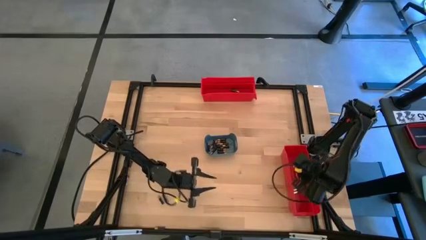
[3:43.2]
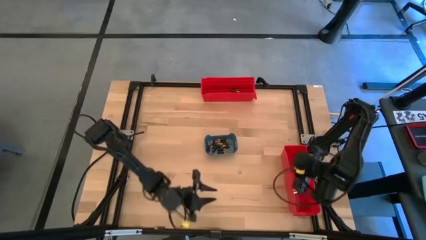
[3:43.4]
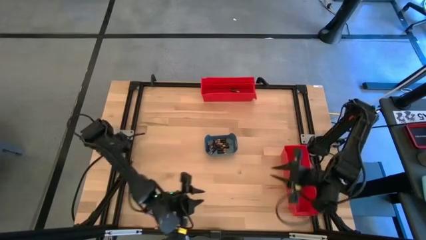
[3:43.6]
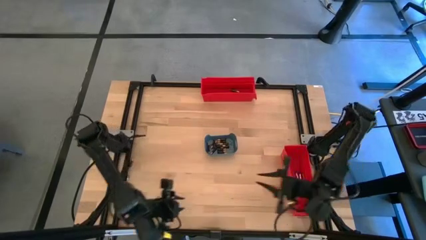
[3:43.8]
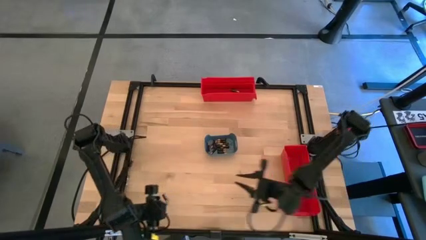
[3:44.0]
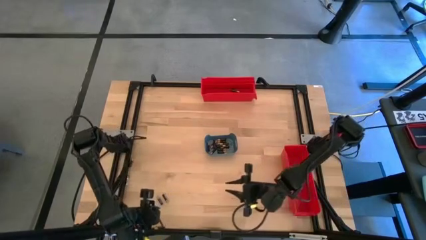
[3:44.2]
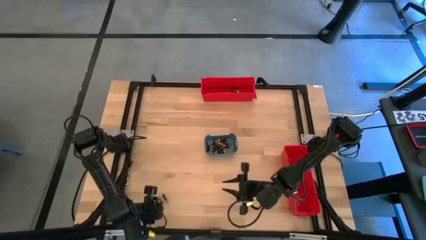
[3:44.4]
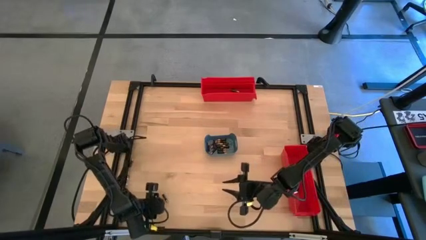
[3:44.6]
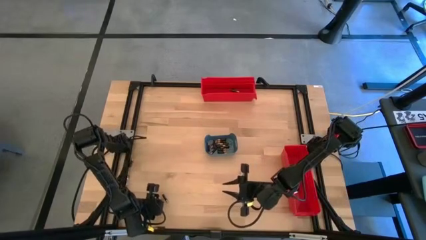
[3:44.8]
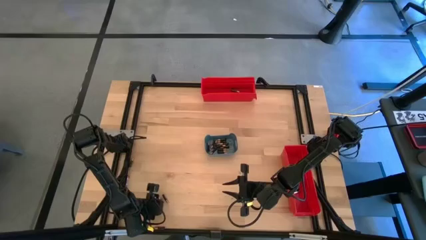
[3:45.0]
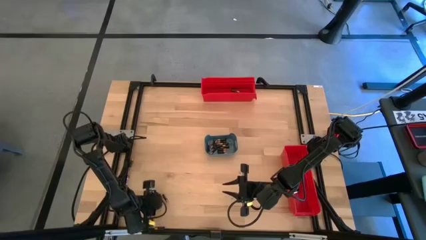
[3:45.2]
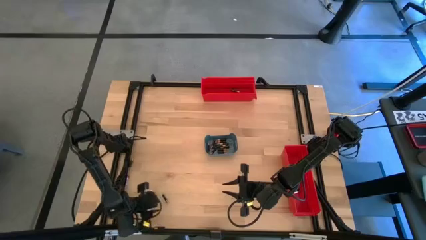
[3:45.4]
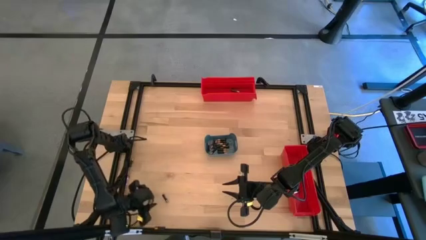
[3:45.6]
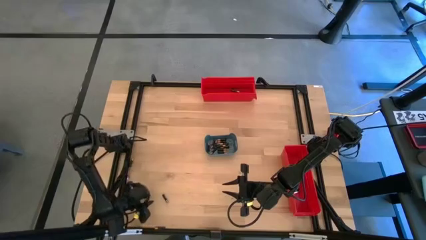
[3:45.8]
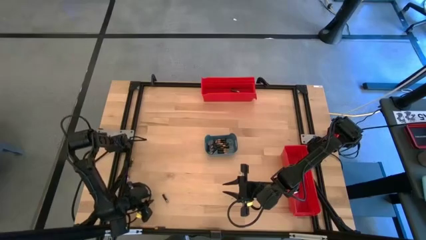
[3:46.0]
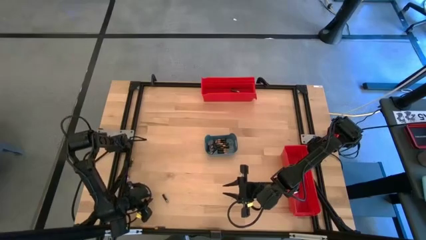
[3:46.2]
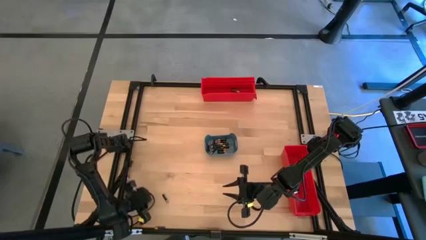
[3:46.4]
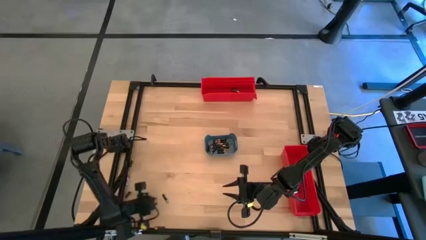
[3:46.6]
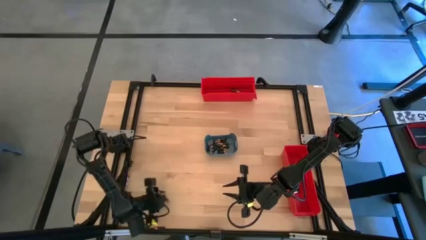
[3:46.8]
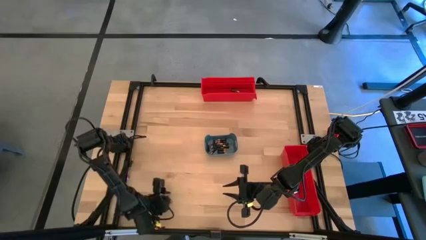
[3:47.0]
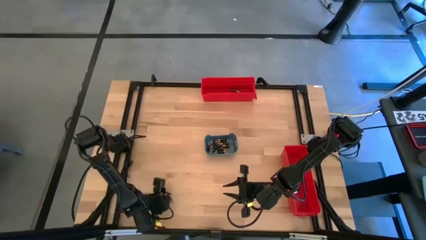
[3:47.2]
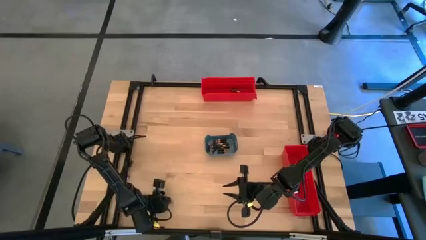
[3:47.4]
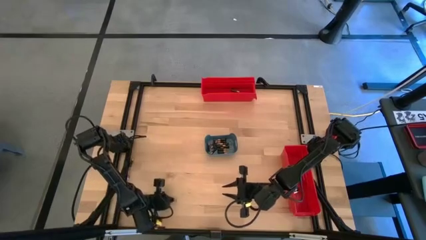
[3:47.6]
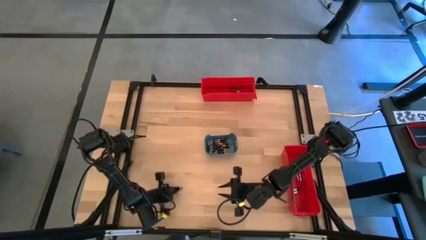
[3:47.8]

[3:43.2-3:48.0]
Task: Sort batteries
Put the black battery into the blue bin

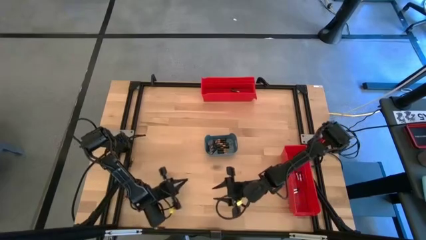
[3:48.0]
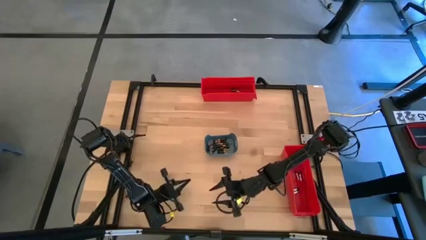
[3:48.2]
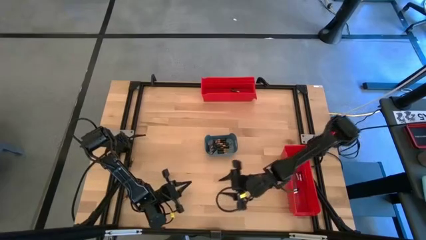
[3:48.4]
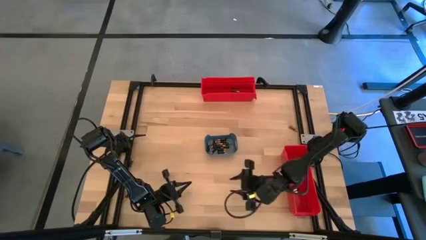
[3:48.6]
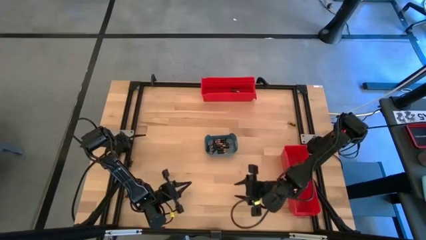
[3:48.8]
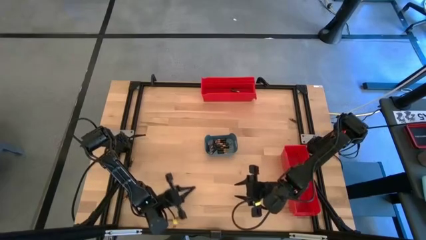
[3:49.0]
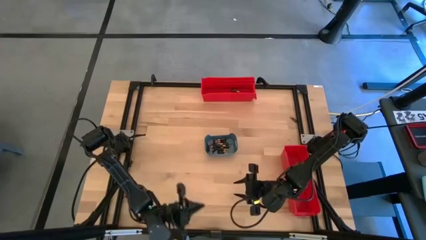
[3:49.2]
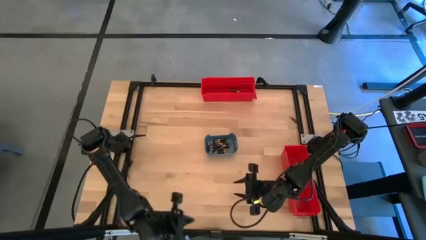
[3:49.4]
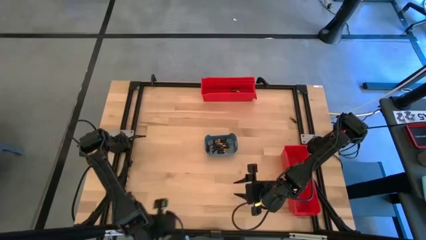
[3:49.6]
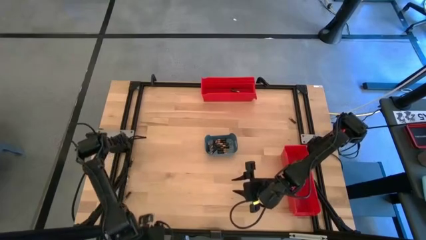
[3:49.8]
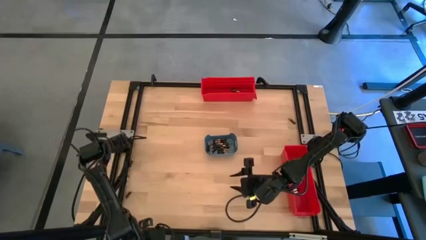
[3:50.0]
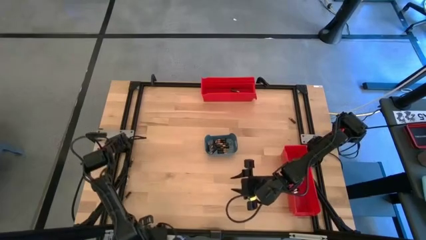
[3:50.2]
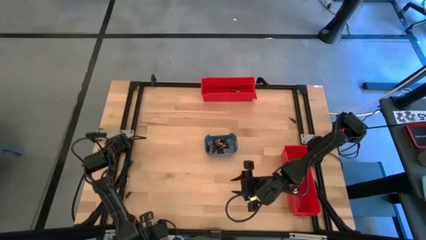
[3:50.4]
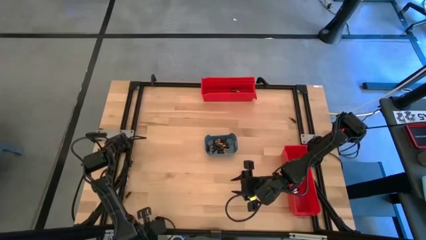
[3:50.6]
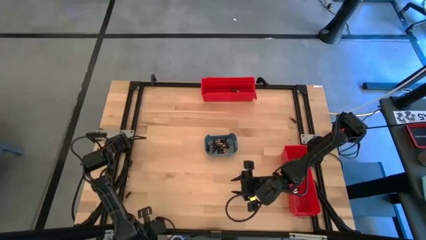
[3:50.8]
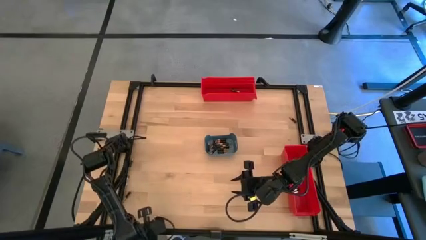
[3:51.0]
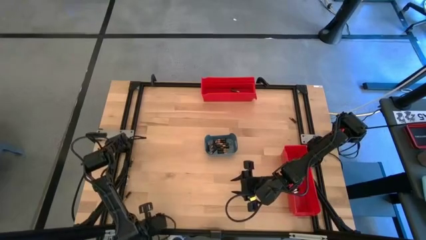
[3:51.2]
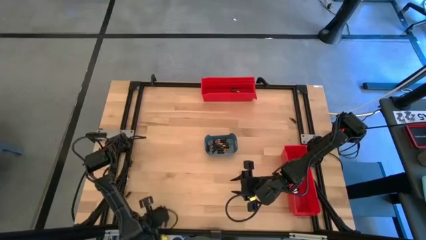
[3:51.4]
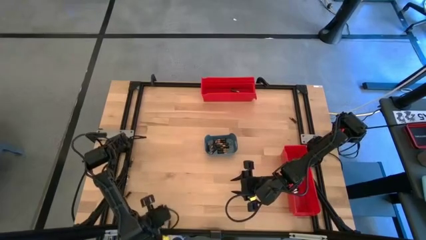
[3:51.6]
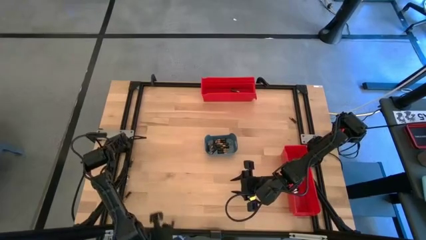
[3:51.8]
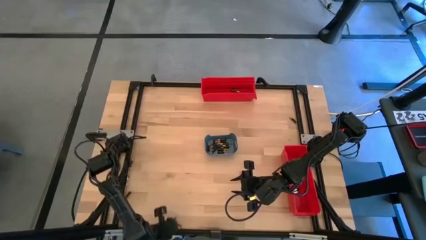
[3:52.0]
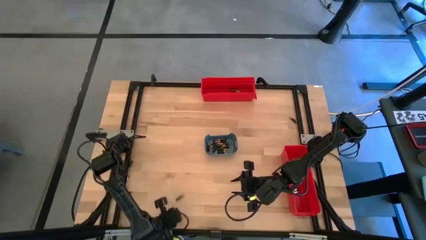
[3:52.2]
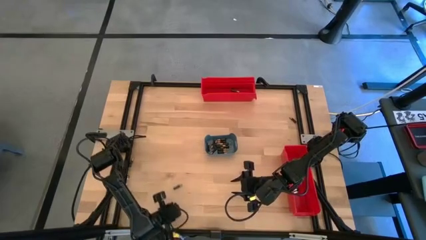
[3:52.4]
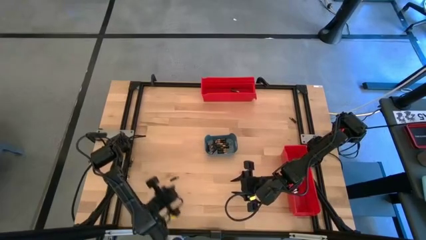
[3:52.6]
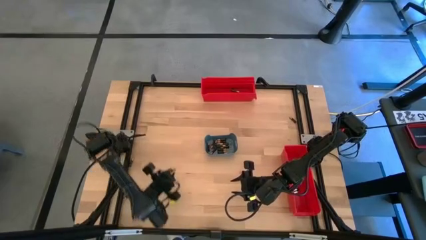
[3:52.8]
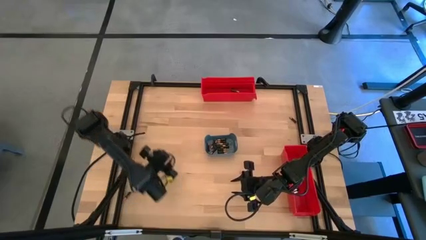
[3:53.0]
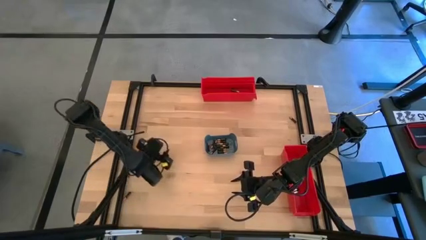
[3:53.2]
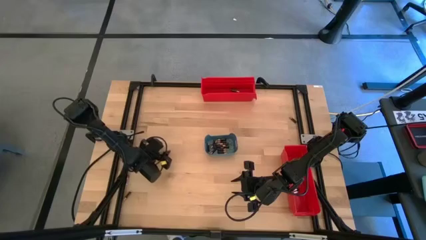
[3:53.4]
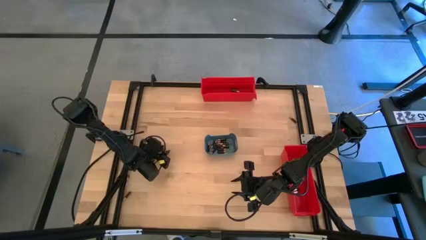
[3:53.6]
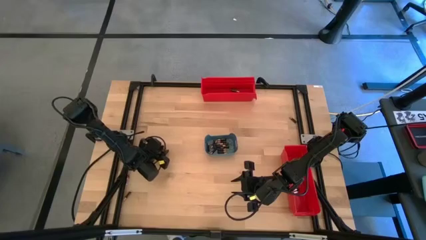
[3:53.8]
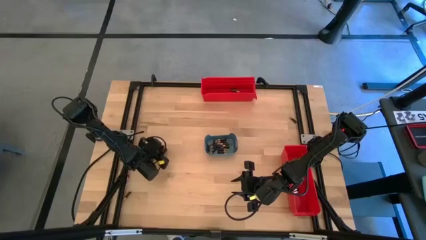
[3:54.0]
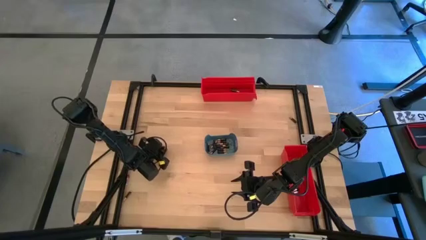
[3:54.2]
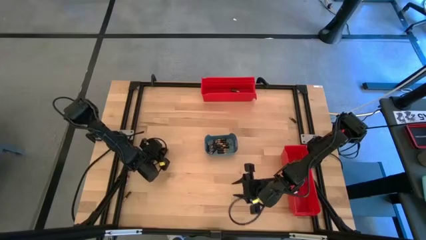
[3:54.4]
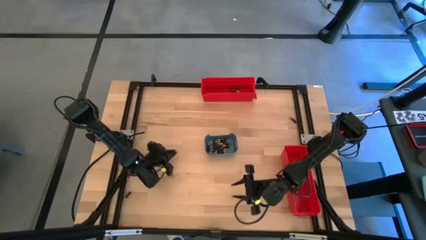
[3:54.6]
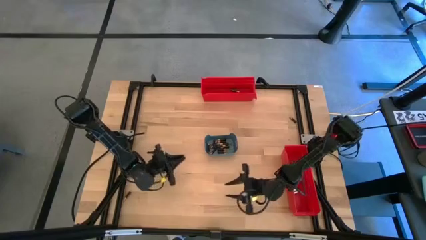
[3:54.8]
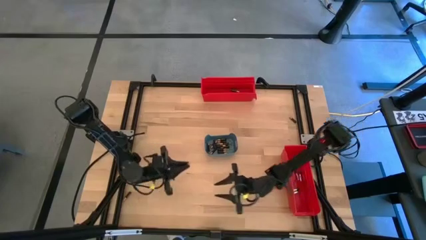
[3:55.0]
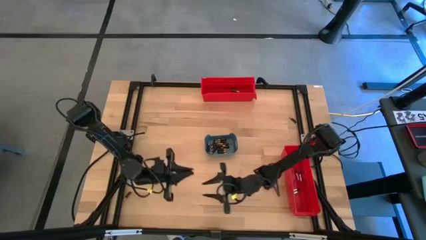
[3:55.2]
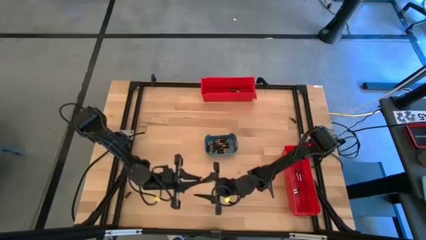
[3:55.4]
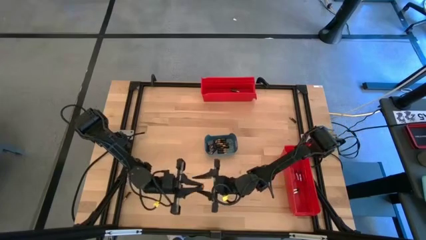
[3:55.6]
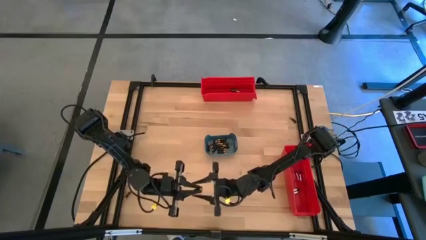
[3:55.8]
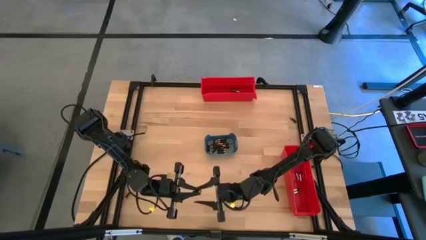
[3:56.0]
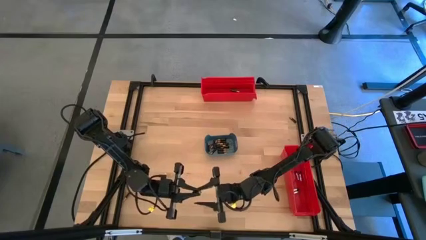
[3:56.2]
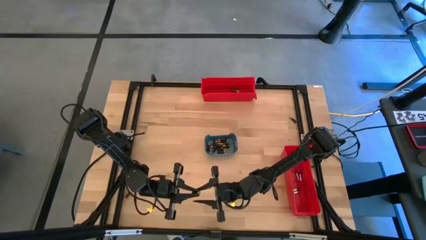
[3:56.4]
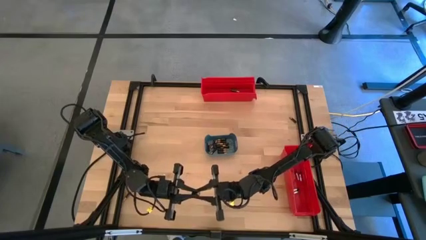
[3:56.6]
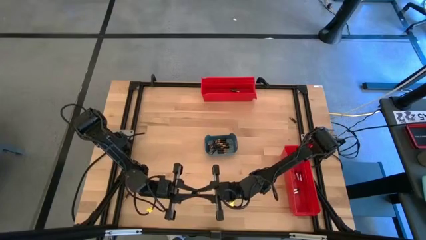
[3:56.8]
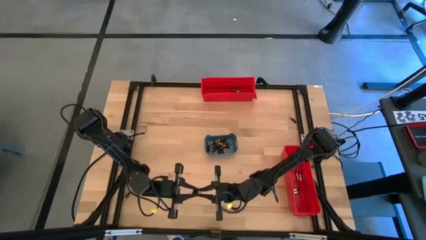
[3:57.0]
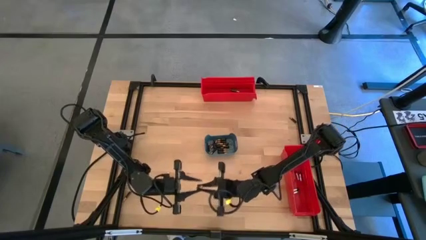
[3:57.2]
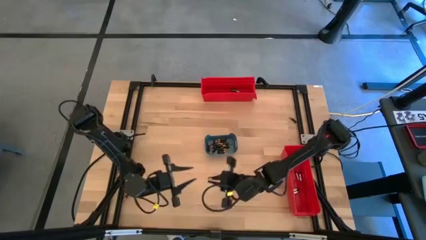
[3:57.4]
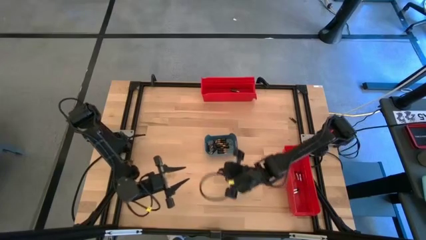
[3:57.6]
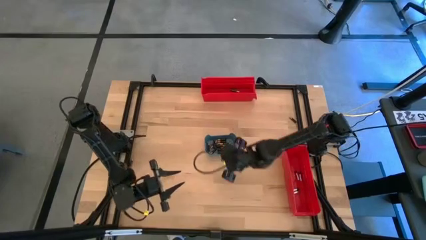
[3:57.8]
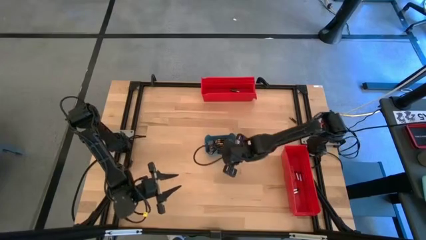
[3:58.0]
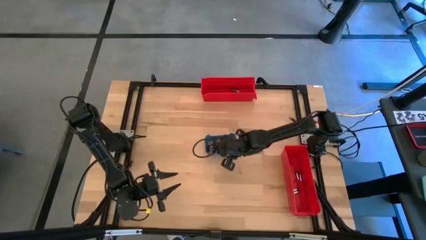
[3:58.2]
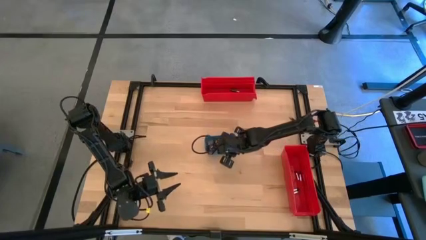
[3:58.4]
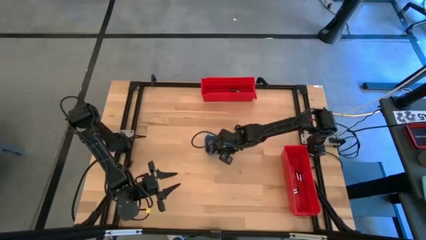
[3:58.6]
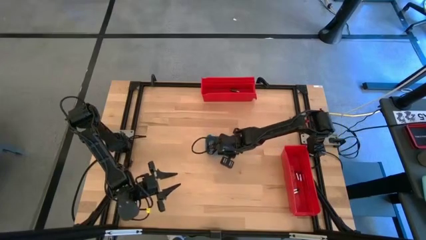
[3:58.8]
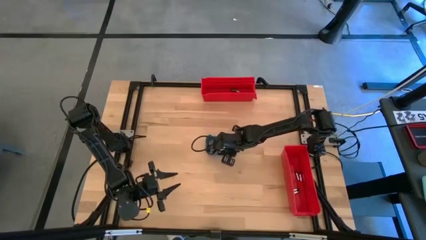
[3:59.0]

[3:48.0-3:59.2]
Put the black battery into the blue bin
